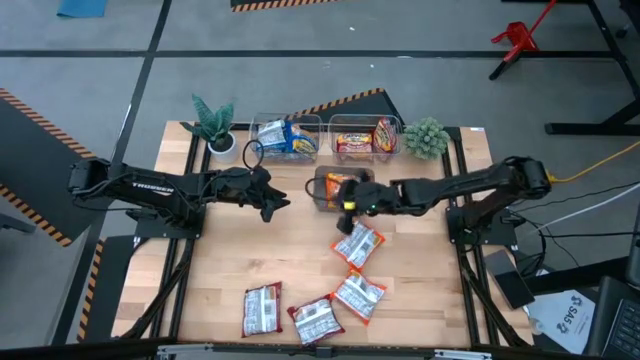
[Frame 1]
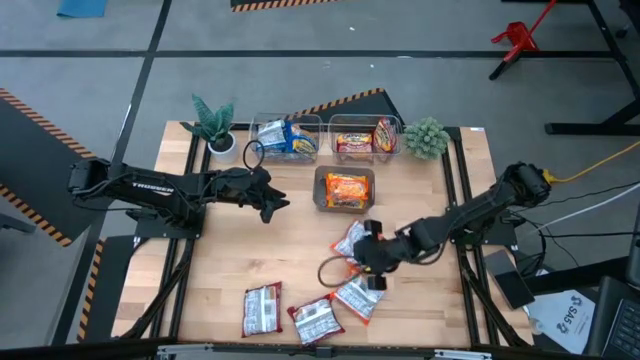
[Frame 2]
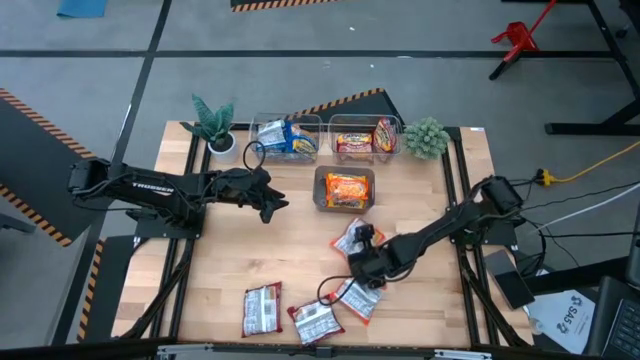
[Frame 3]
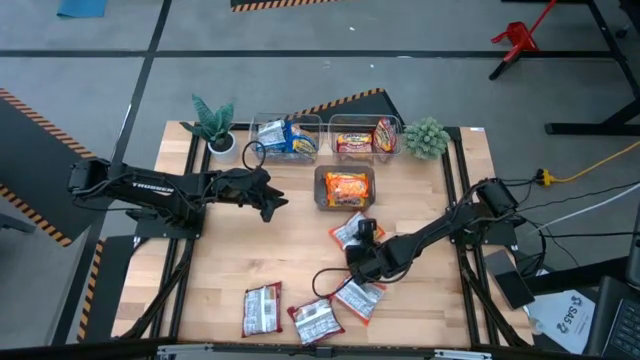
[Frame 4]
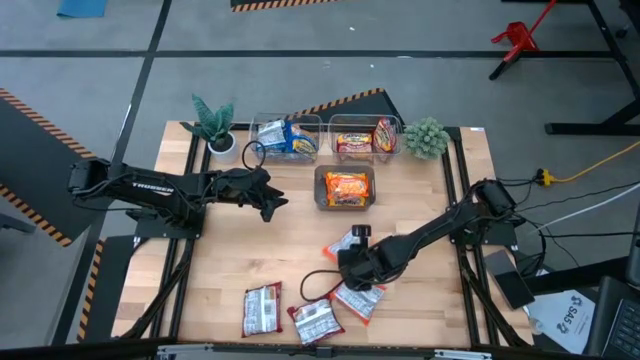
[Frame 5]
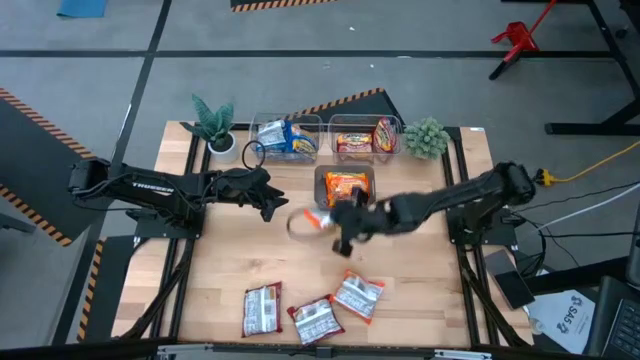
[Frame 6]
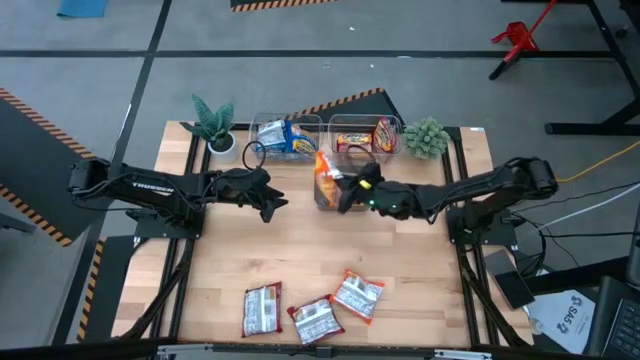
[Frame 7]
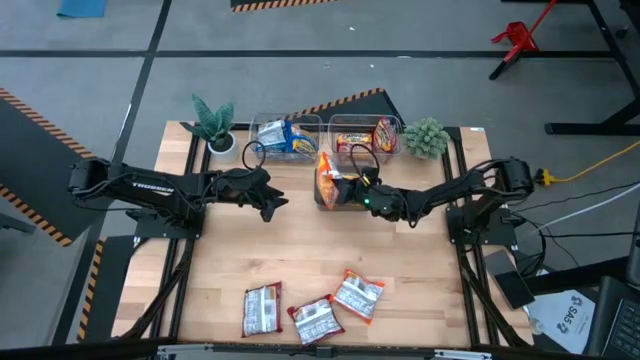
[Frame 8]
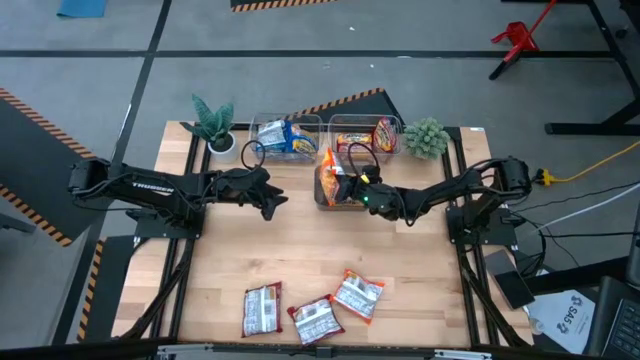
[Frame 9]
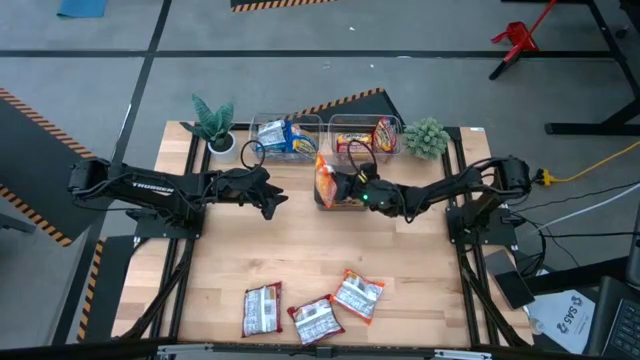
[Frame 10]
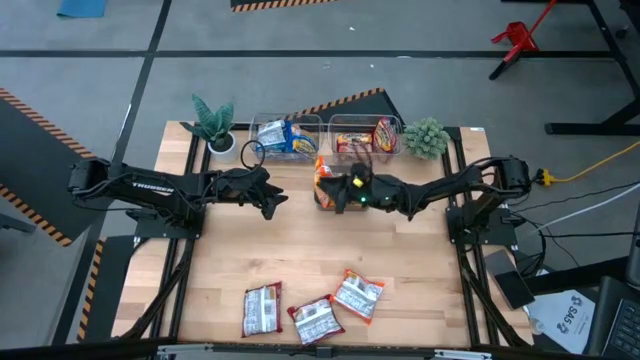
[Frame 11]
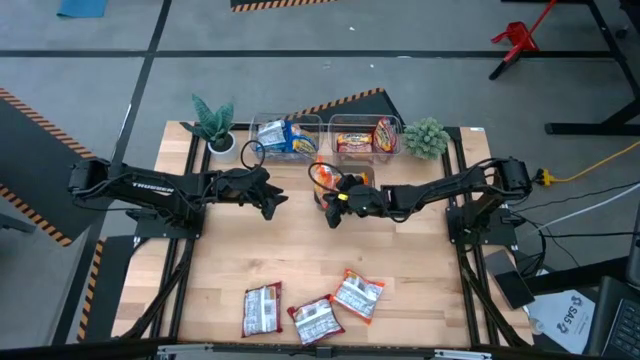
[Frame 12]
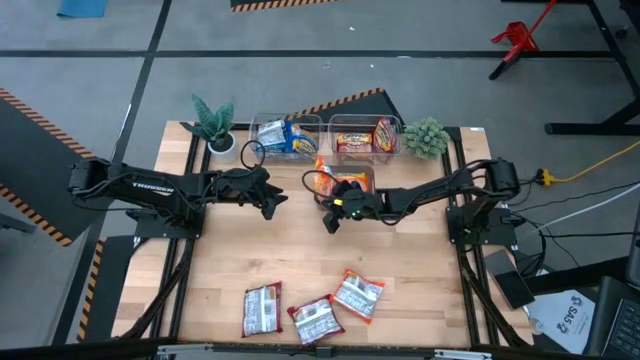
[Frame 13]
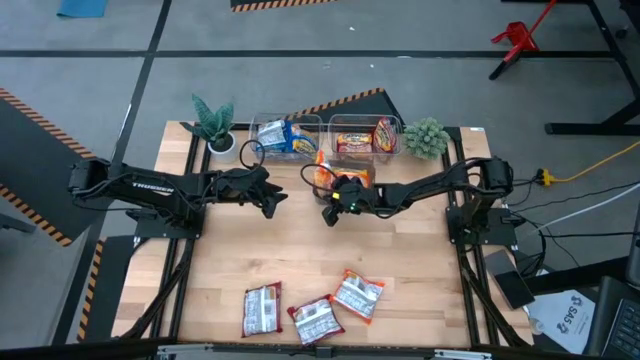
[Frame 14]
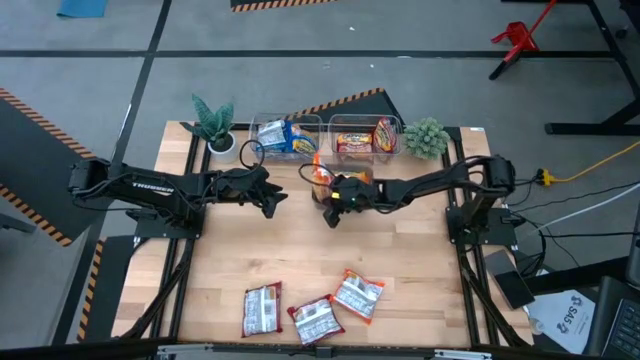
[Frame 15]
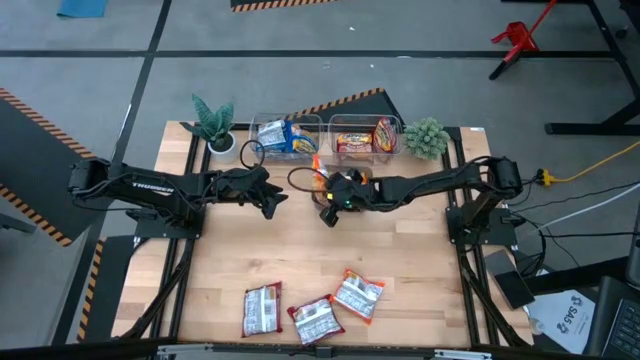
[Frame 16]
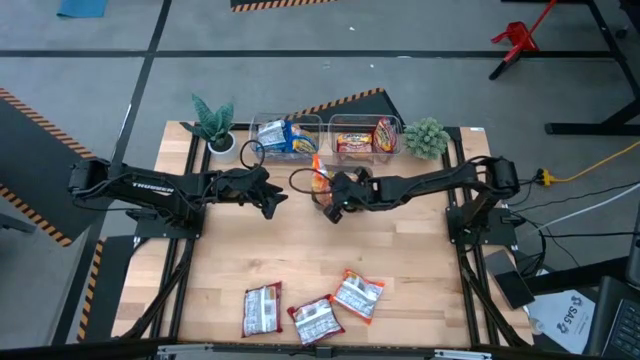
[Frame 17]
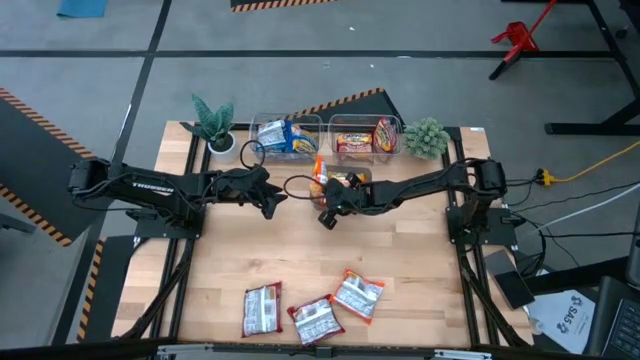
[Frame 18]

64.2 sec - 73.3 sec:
Task: Sort Maruchan noodles
Put the orange noodle pack into the black bin

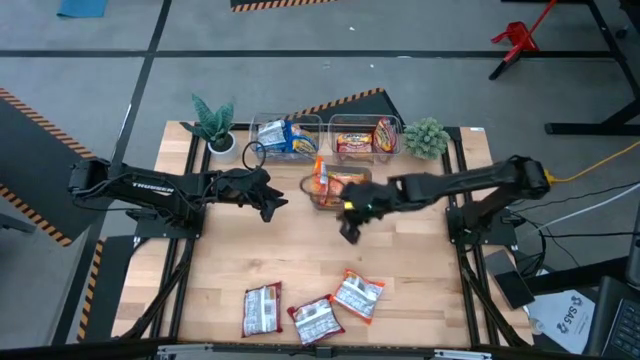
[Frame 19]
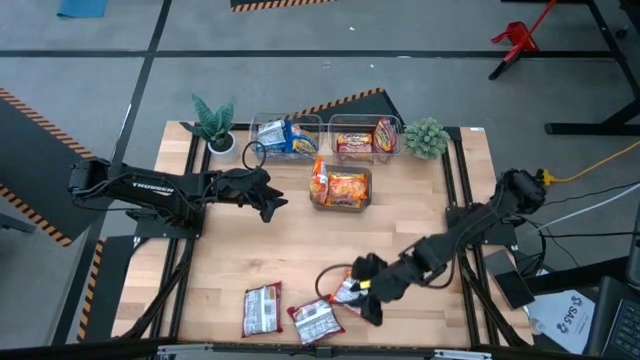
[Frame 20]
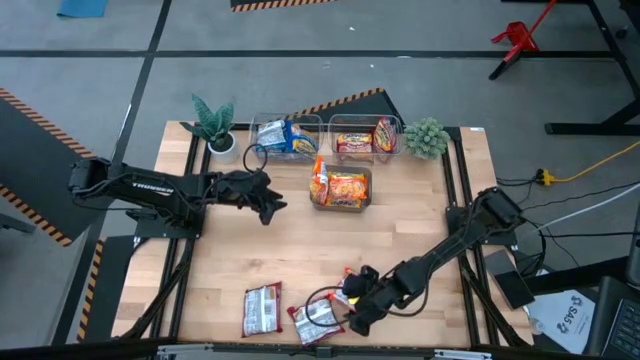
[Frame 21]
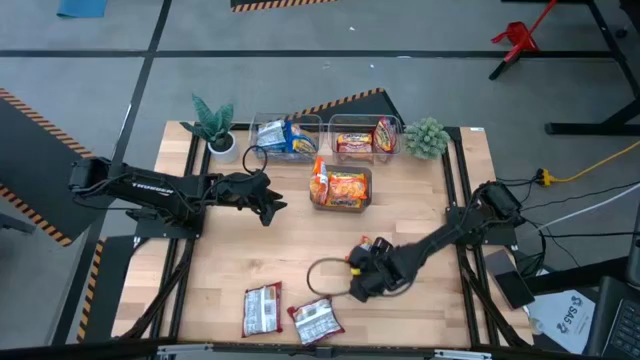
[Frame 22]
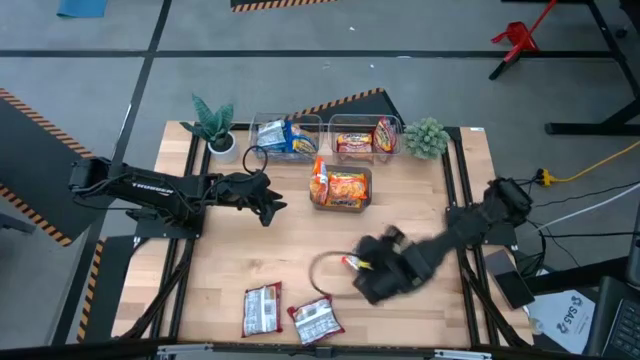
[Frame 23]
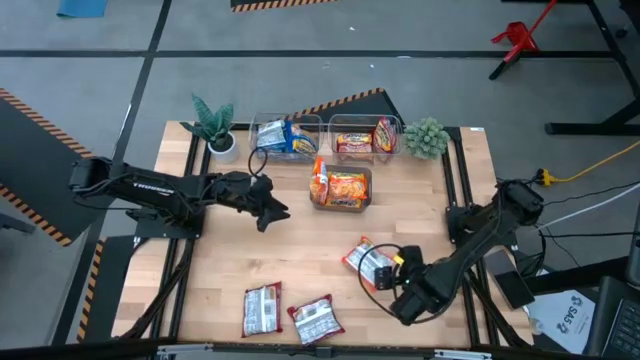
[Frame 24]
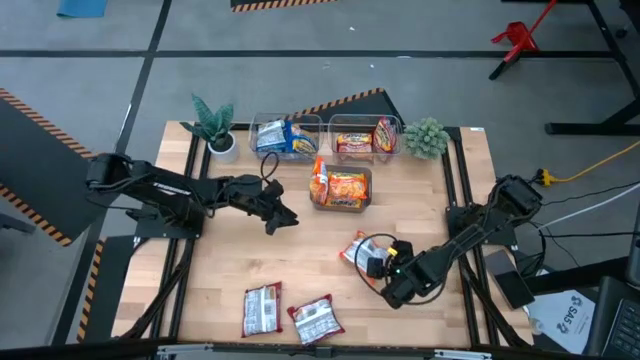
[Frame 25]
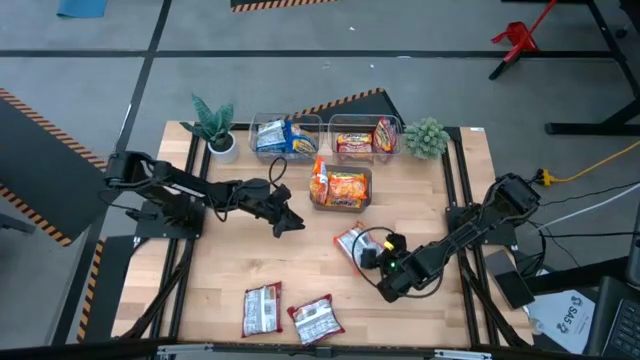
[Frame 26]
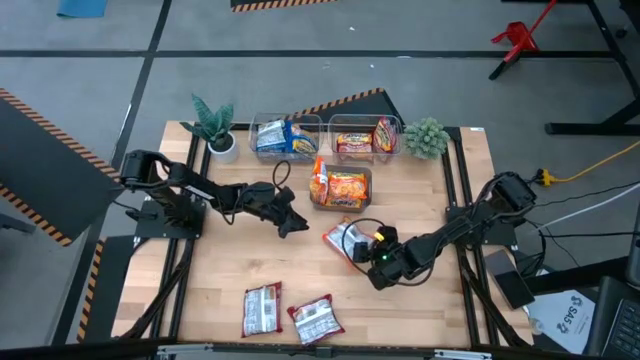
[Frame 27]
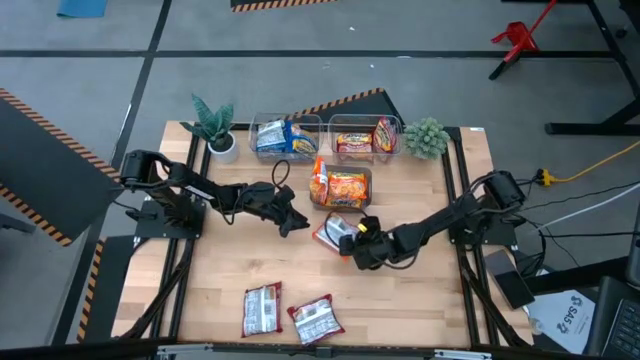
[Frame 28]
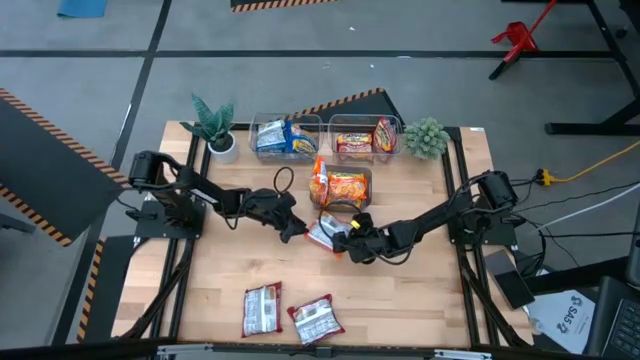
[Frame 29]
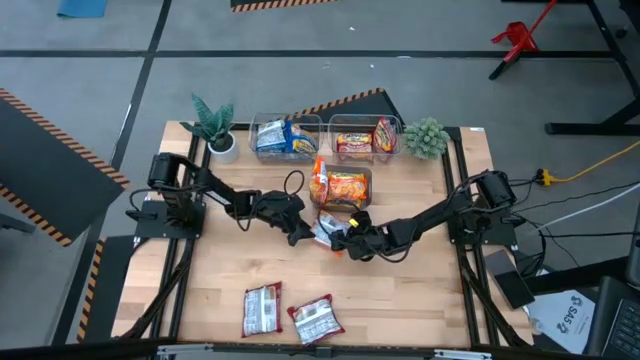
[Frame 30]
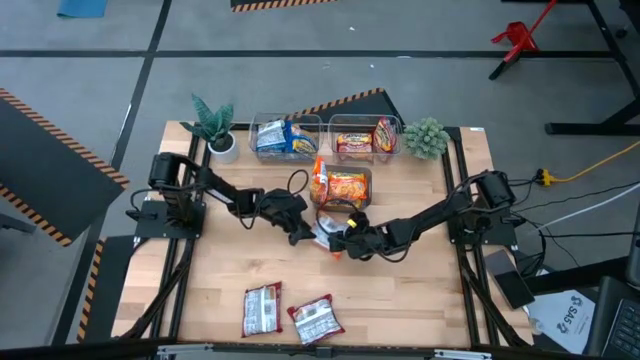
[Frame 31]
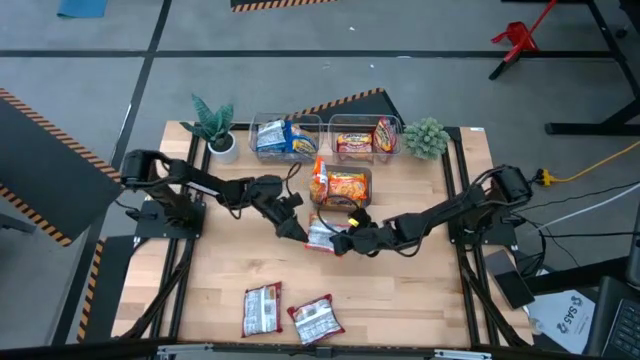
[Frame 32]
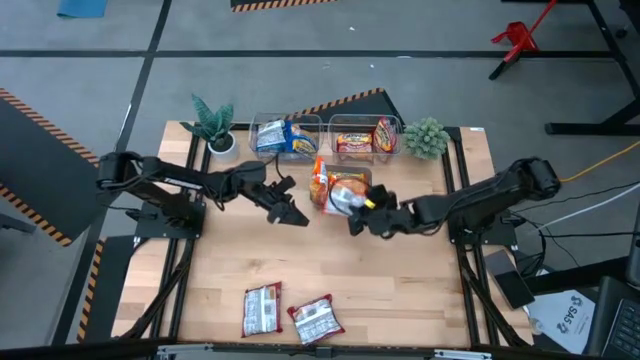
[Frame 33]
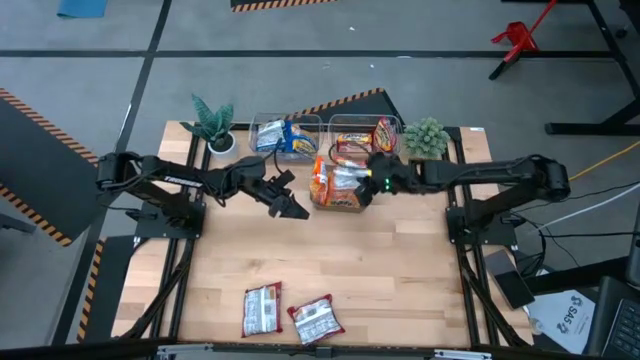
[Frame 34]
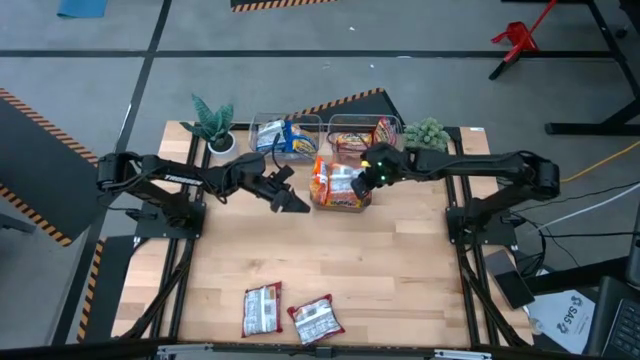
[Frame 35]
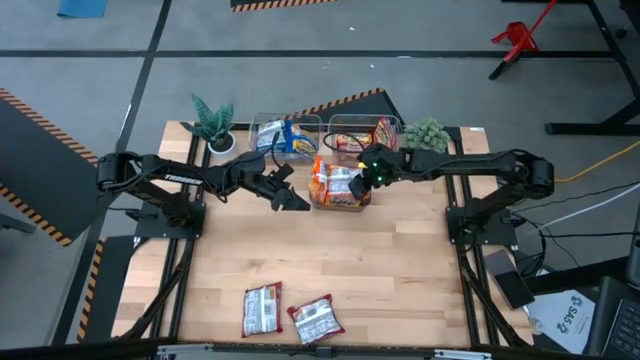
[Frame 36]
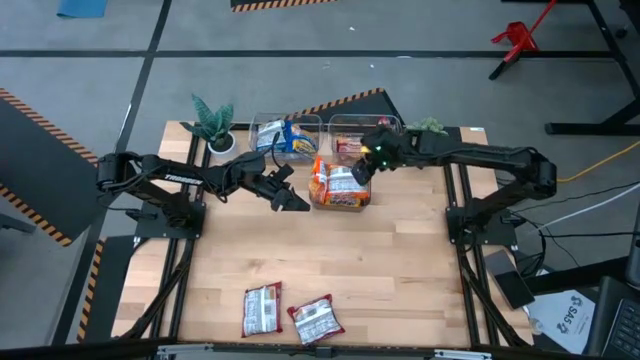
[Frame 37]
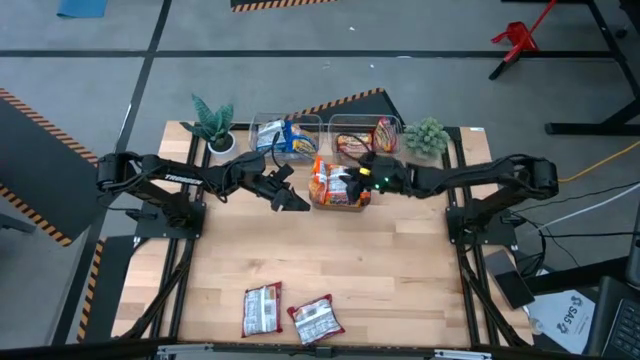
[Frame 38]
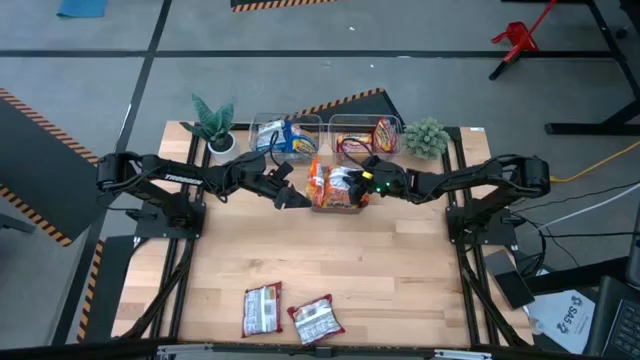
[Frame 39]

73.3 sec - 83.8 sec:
Put the orange noodle pack into the black bin
